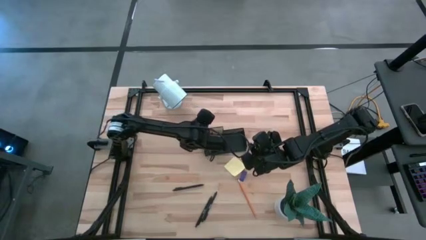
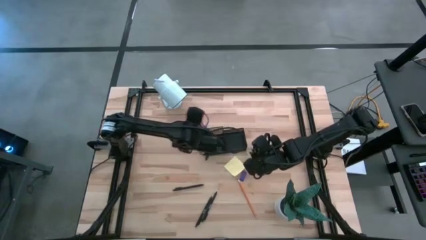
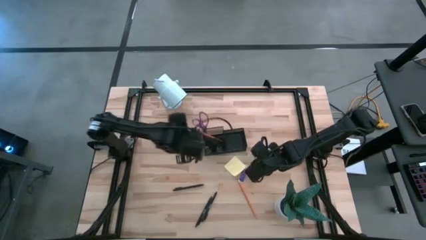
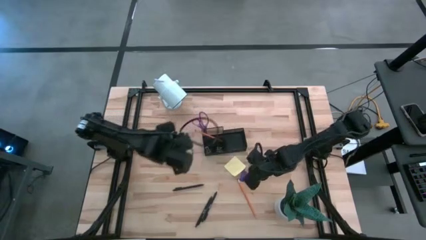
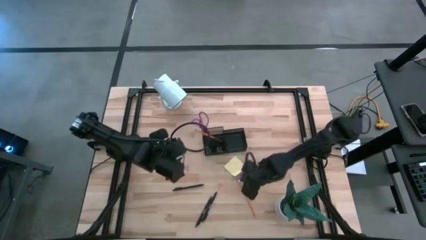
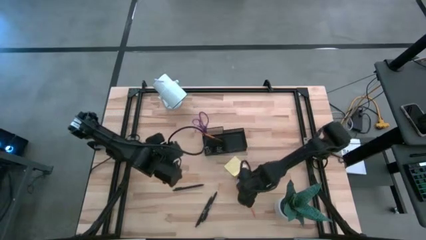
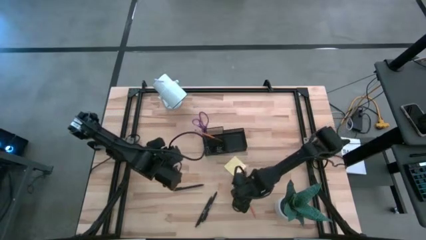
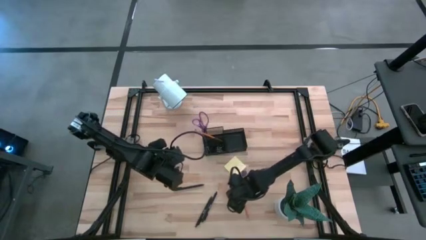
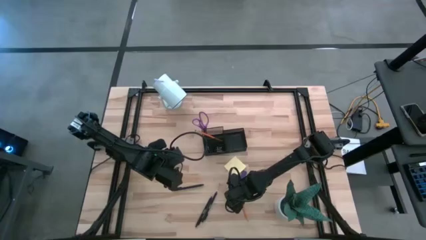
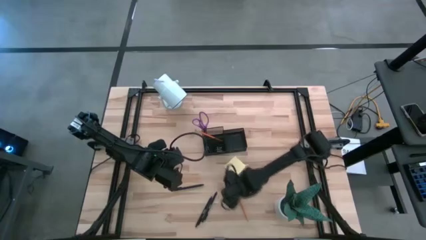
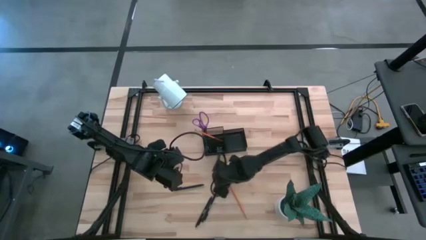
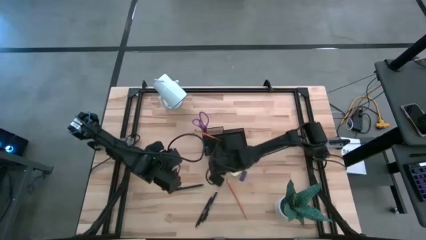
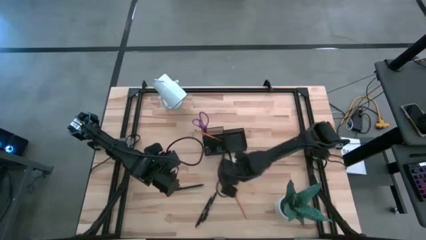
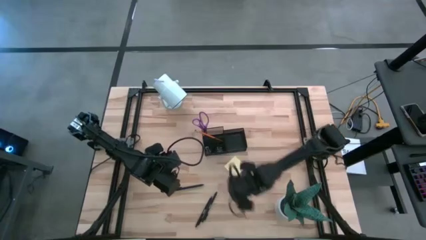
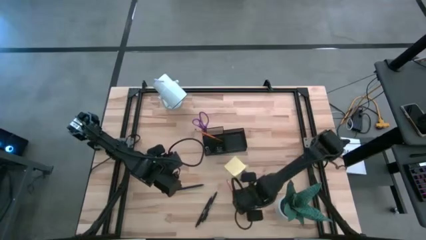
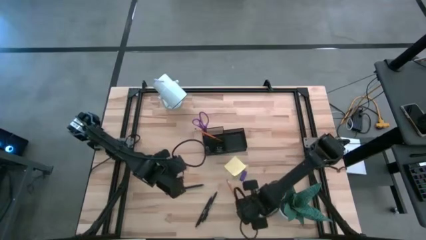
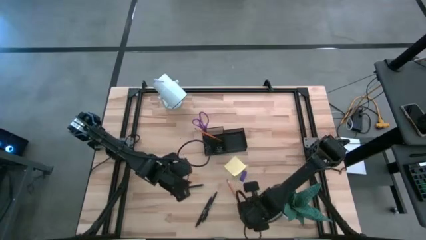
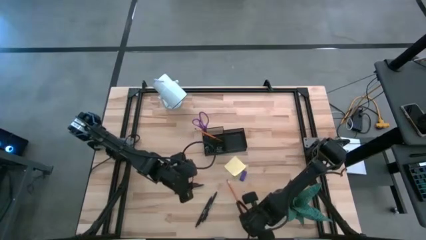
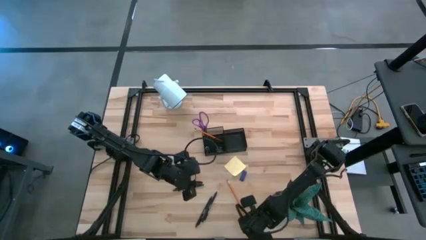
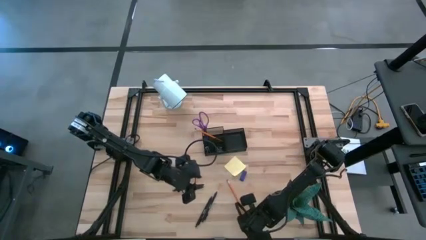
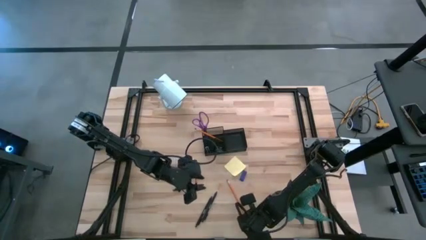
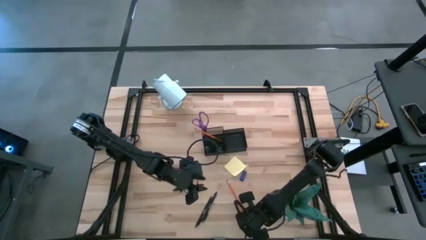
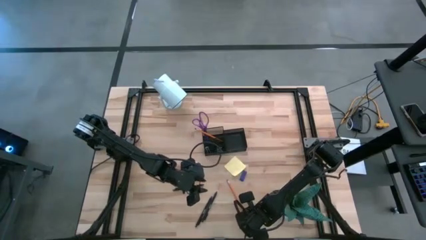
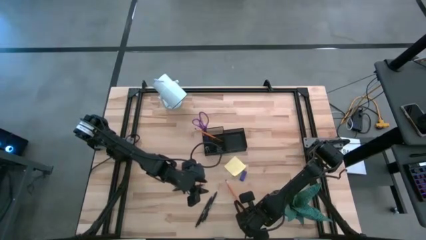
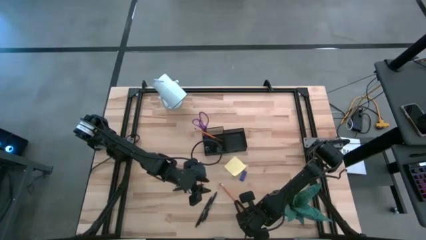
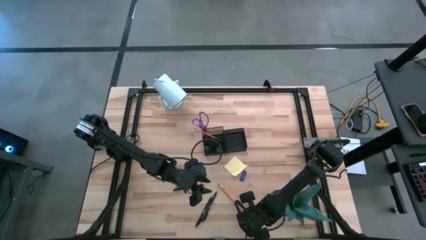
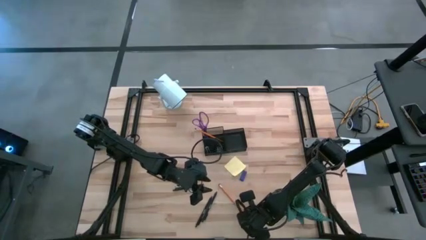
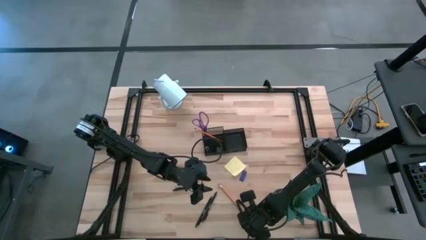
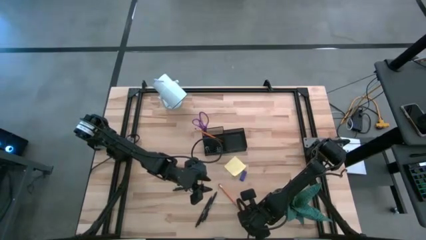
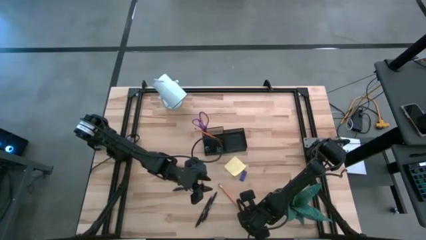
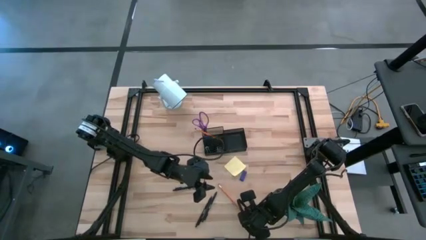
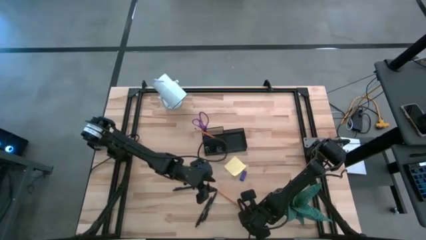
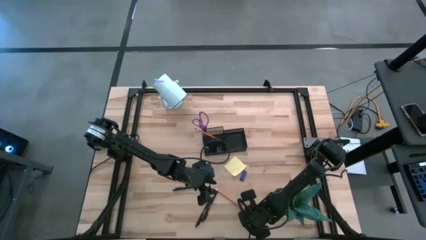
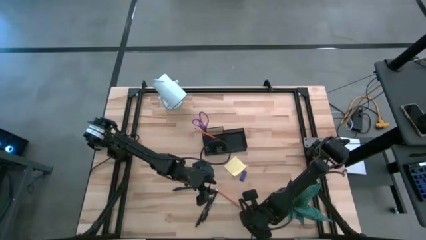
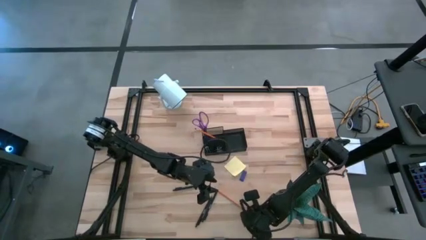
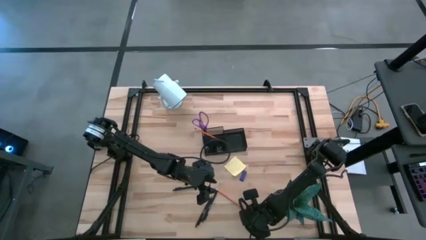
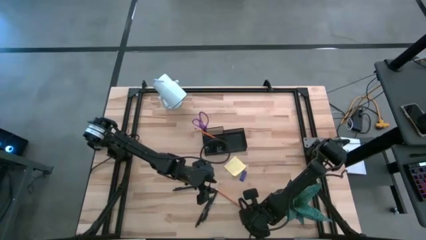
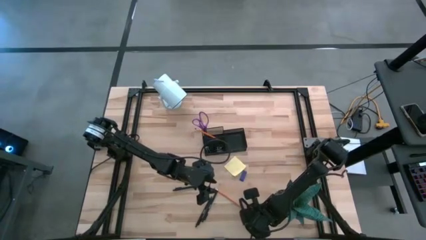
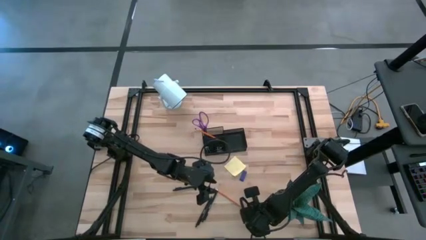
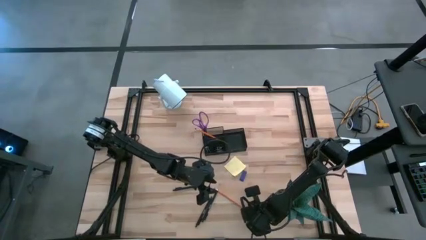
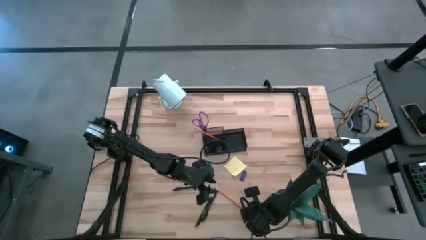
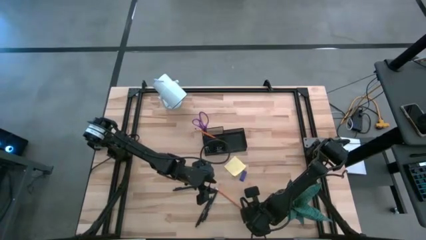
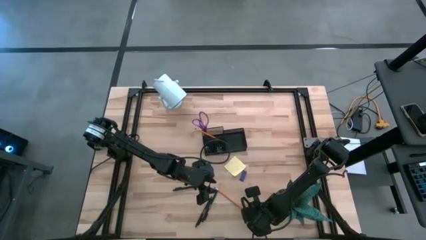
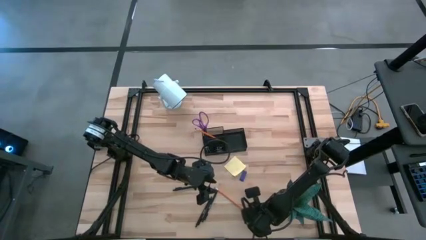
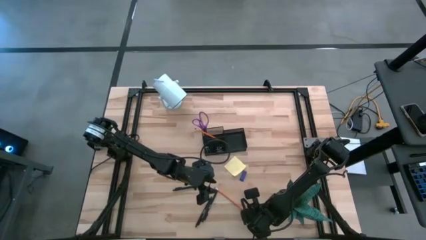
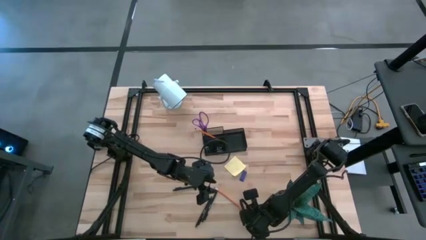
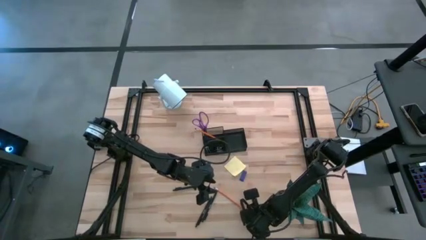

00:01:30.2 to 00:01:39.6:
Task: Pick and place office supplies into organizer
Put the orange pencil into the black desk organizer

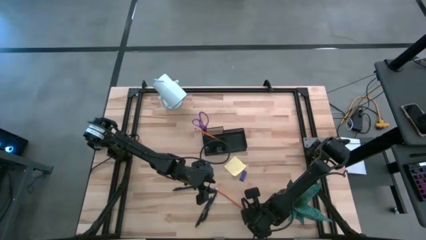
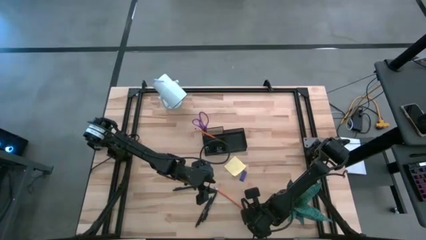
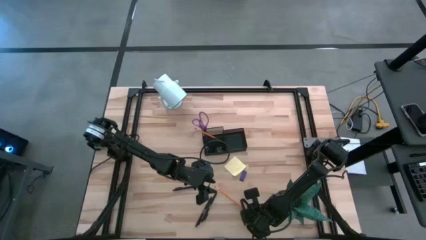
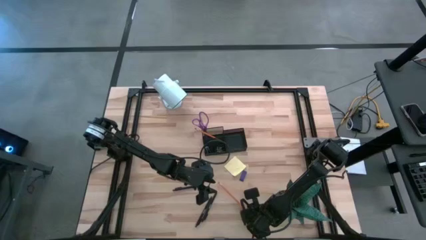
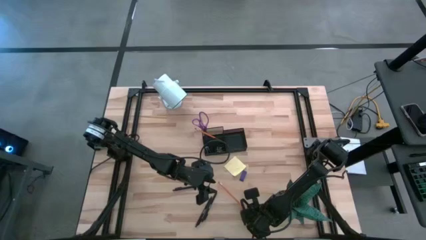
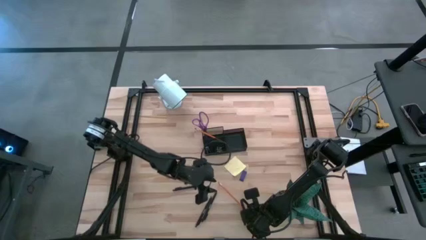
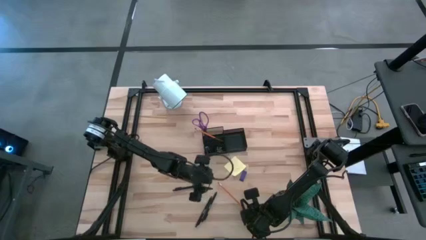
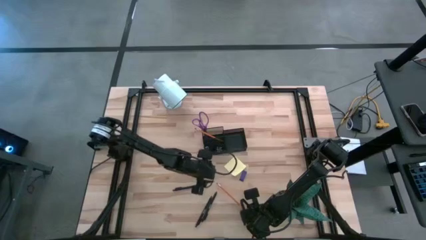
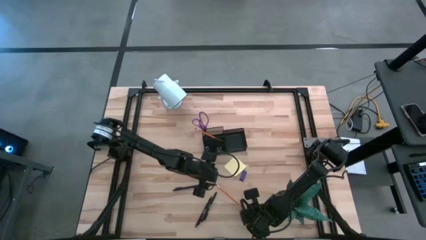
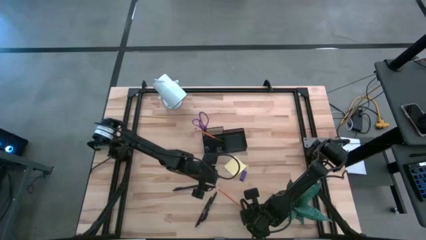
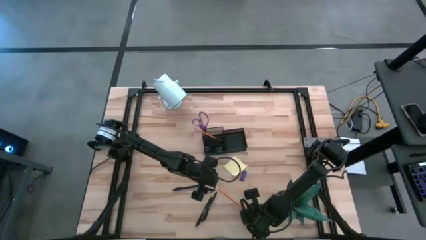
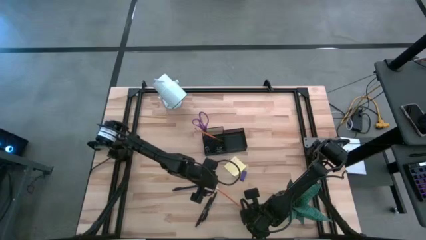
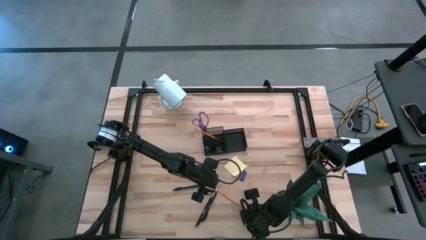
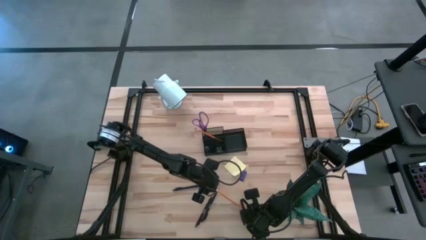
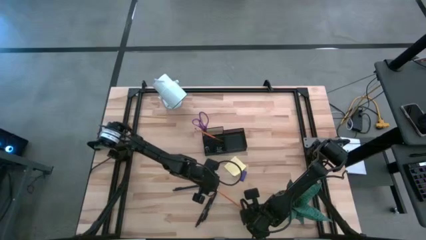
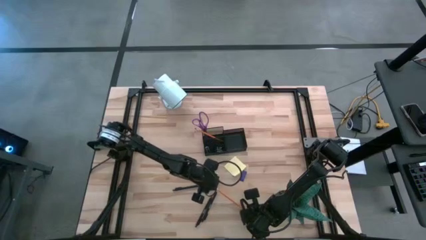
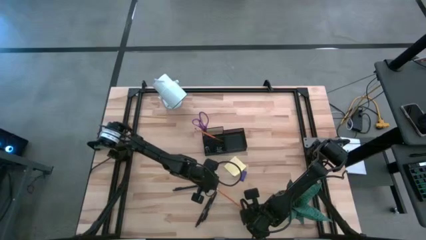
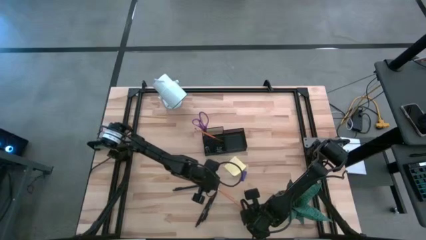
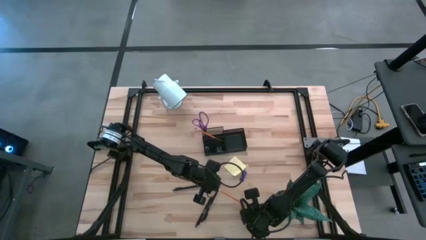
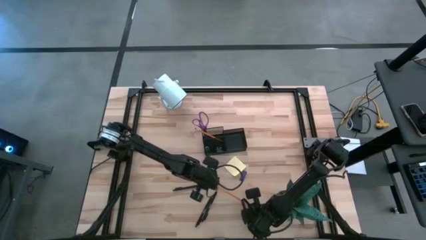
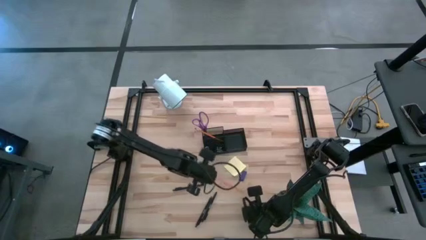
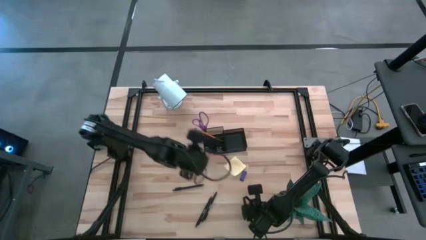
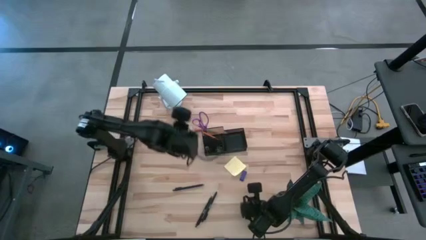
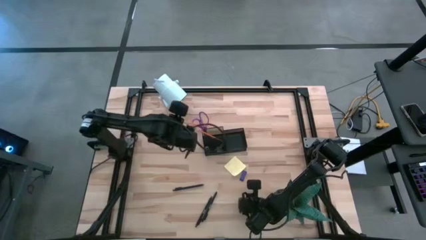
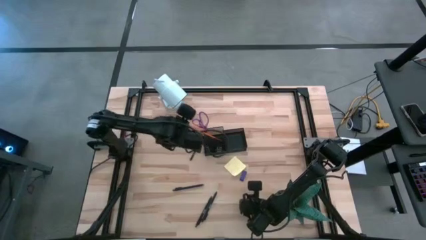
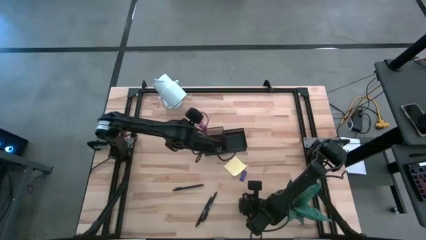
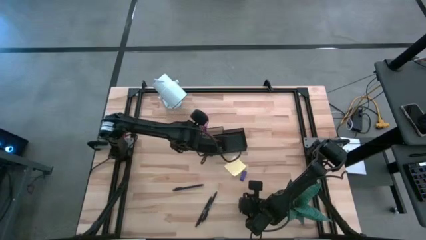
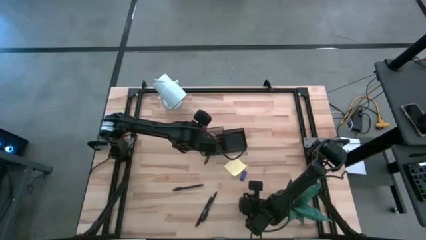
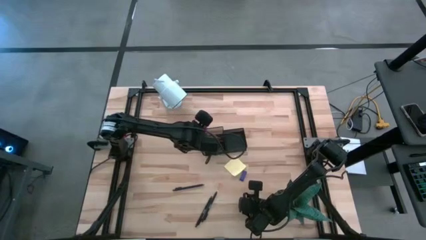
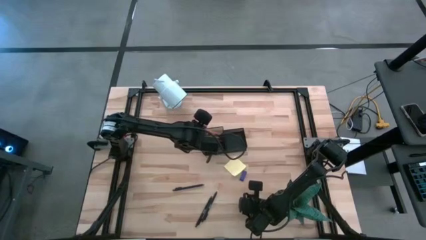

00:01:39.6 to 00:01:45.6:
Put the orange pencil into the black desk organizer

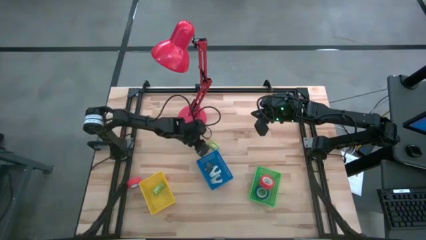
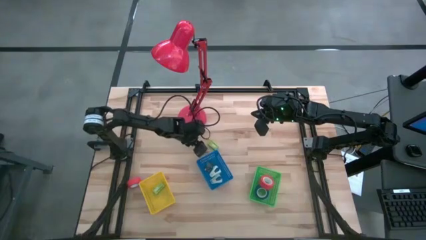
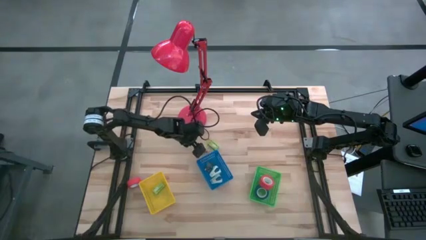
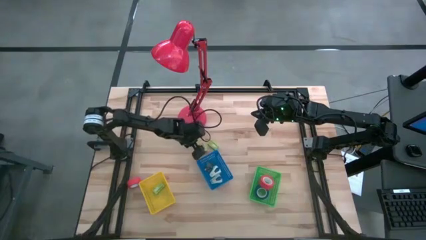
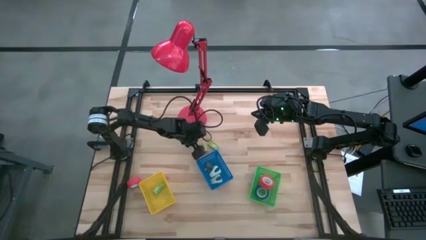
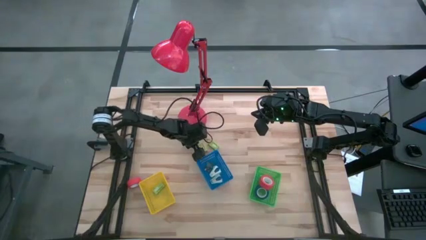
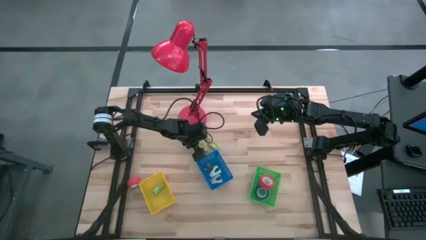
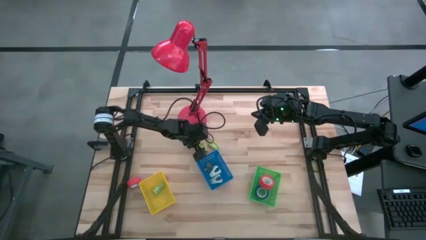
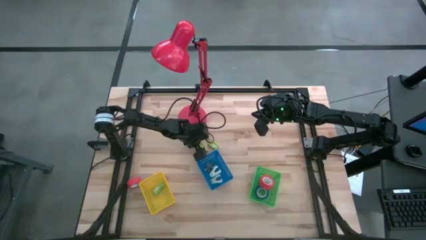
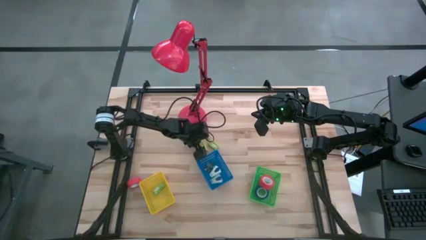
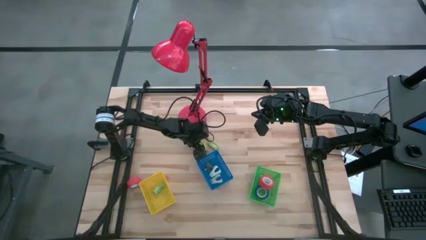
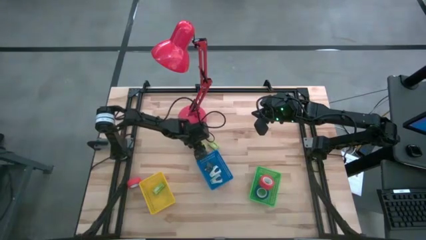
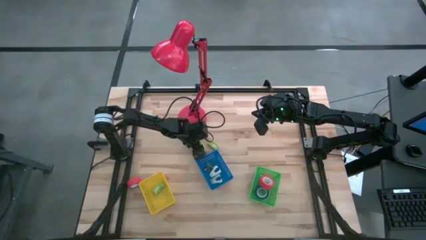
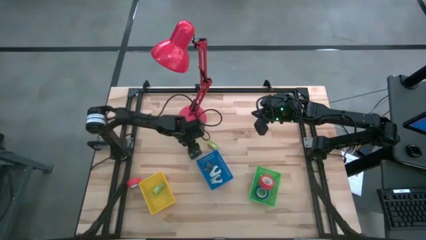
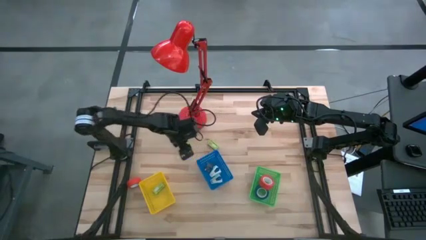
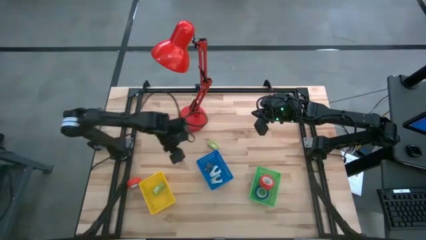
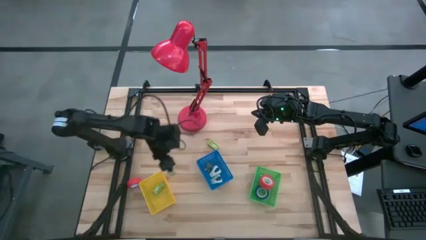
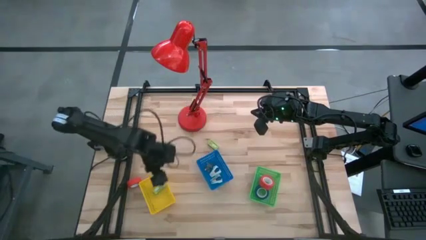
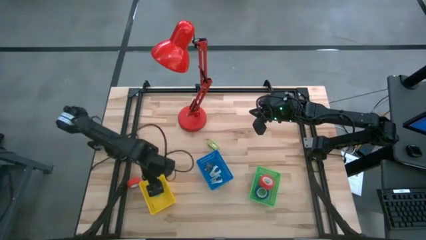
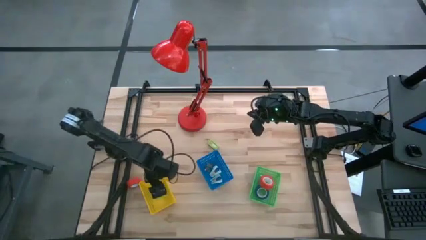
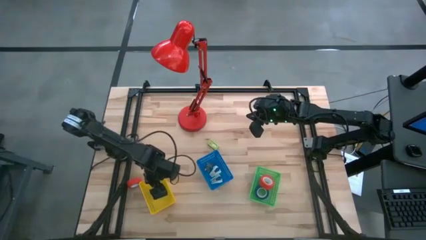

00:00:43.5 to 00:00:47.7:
Task: Pick and place Stapler, Stapler remover, tape
Put the left green staple pin box into the yellow bin
